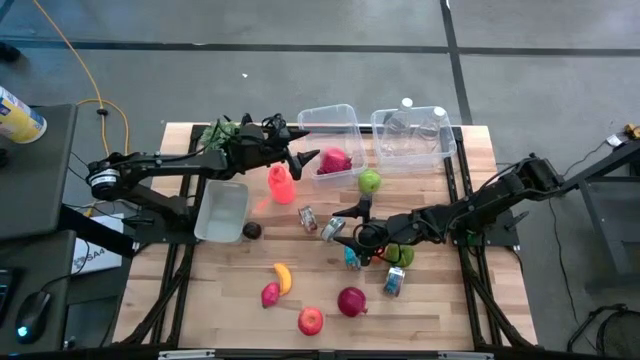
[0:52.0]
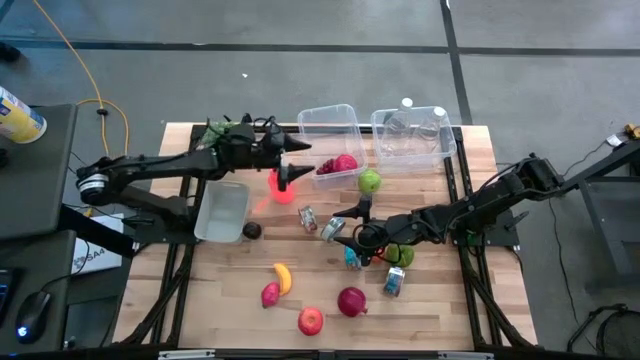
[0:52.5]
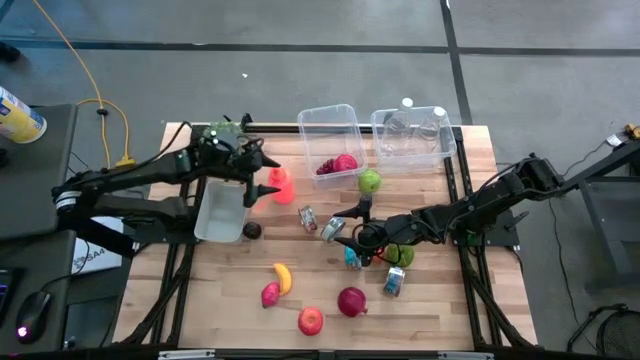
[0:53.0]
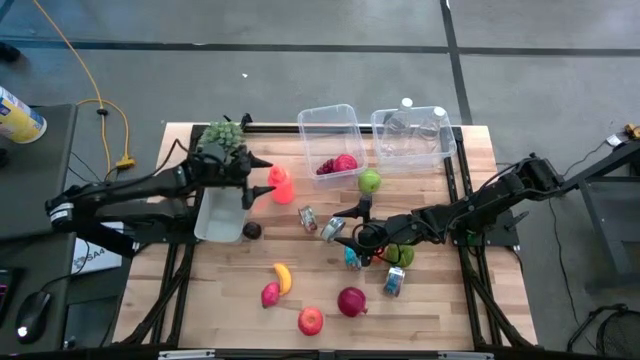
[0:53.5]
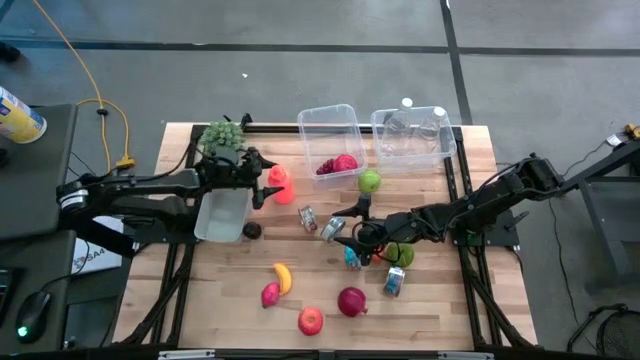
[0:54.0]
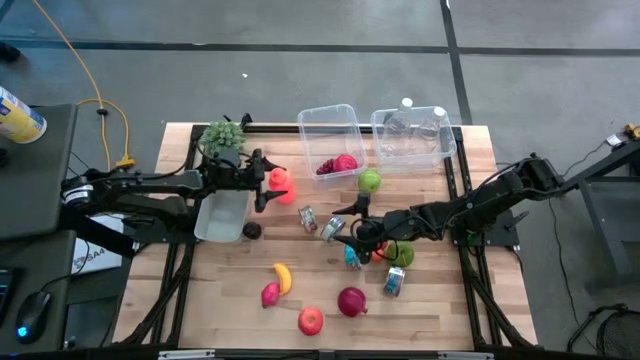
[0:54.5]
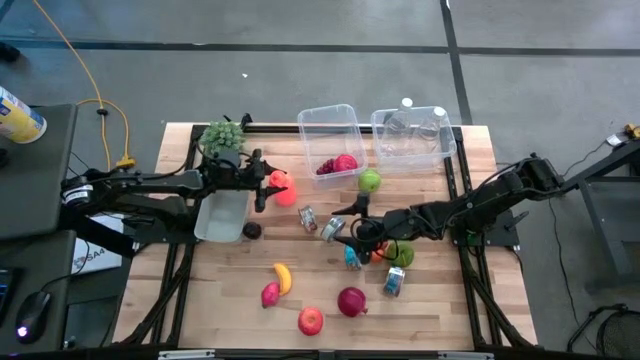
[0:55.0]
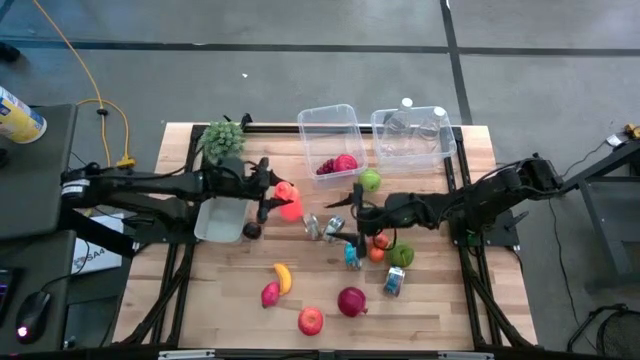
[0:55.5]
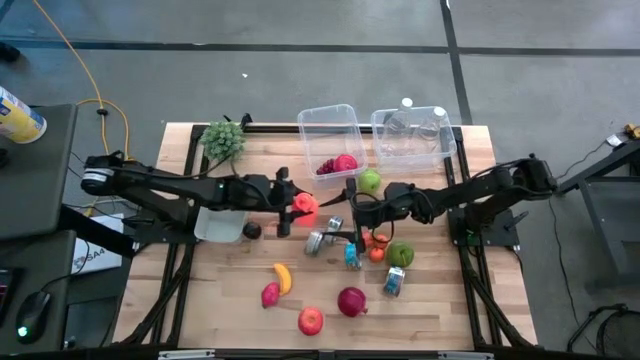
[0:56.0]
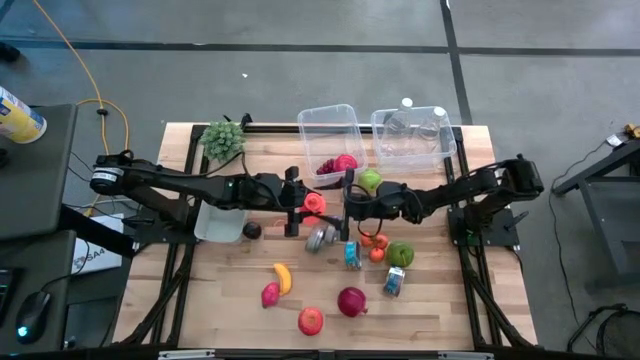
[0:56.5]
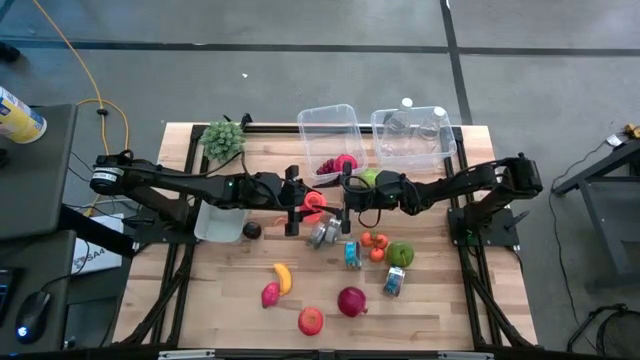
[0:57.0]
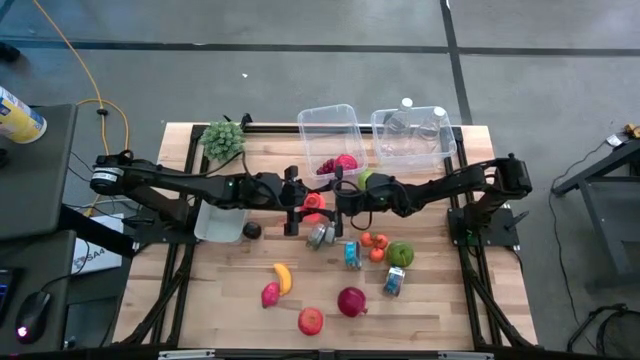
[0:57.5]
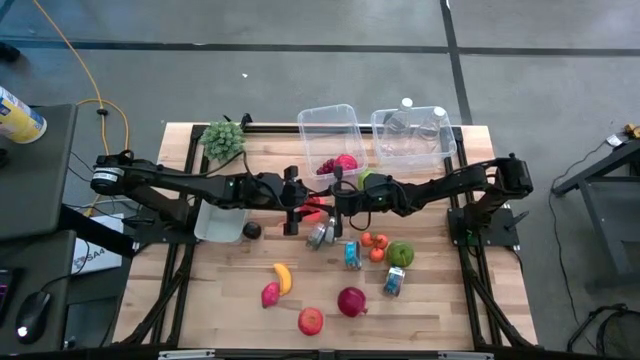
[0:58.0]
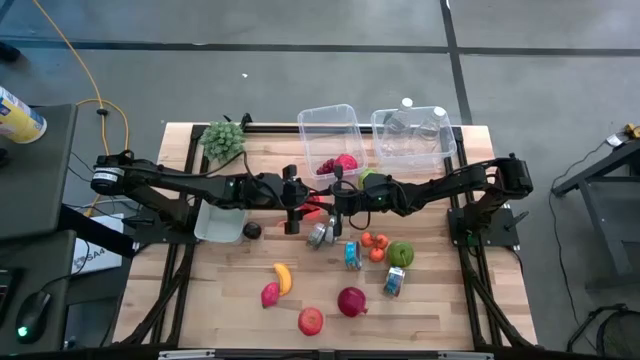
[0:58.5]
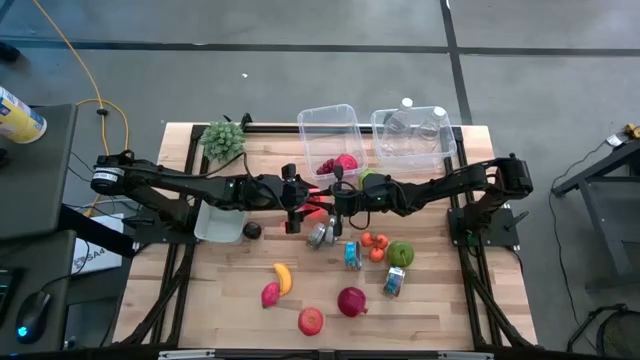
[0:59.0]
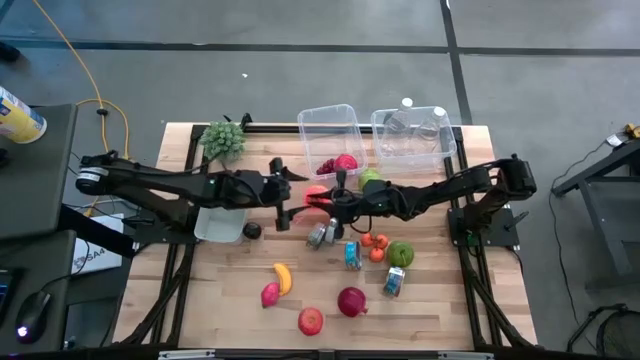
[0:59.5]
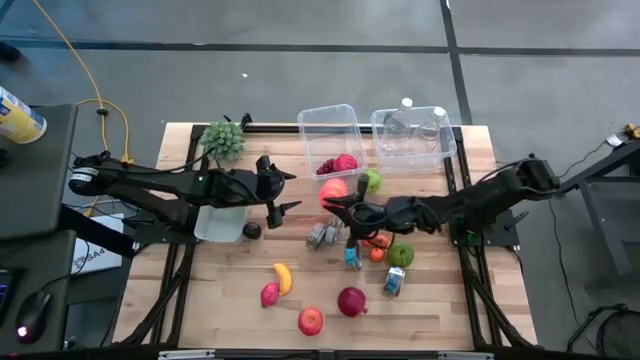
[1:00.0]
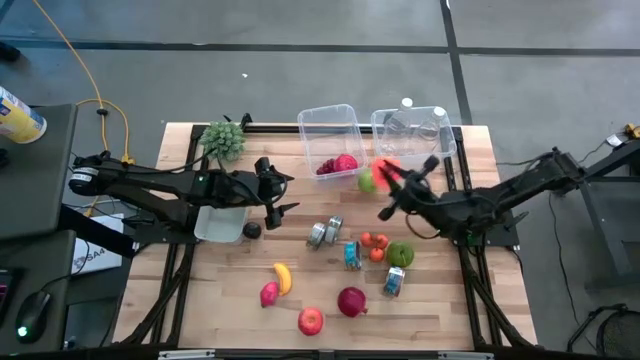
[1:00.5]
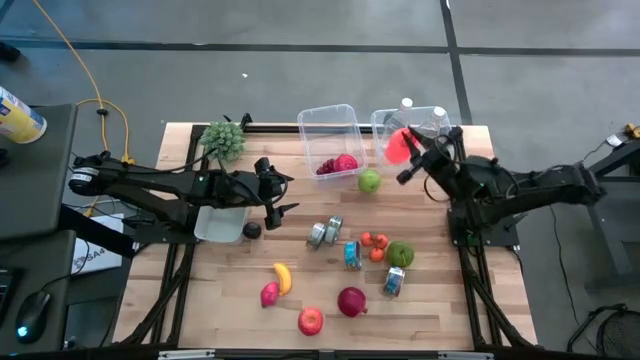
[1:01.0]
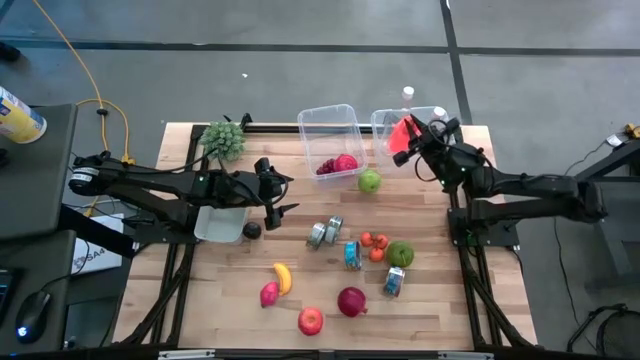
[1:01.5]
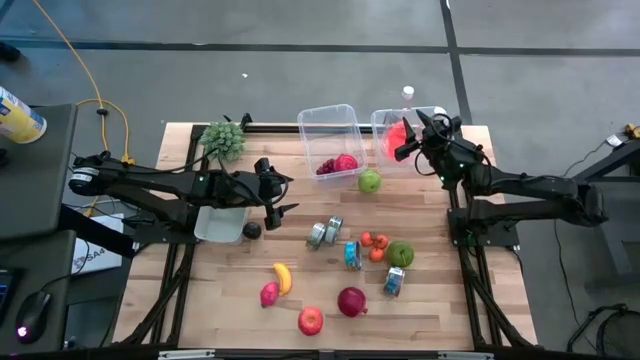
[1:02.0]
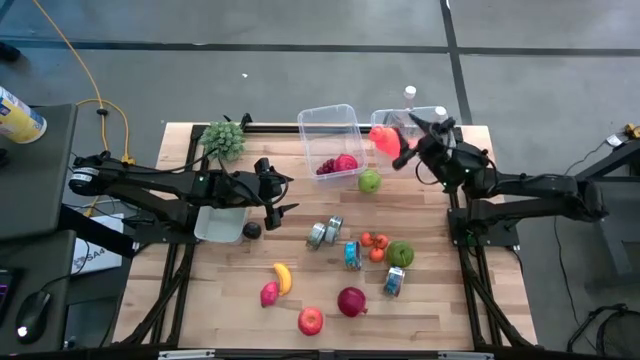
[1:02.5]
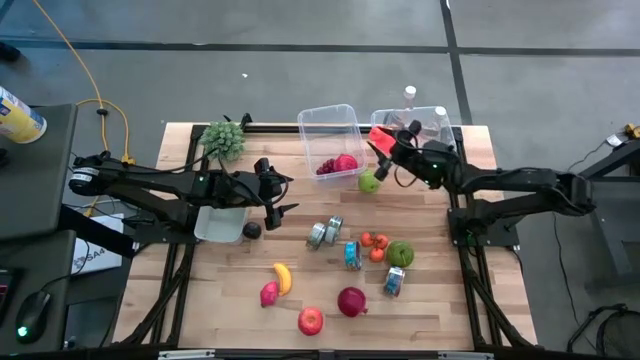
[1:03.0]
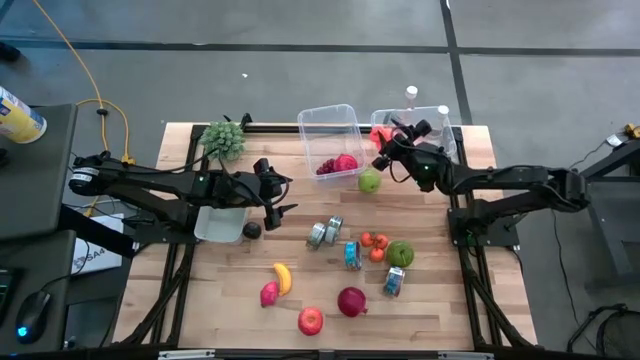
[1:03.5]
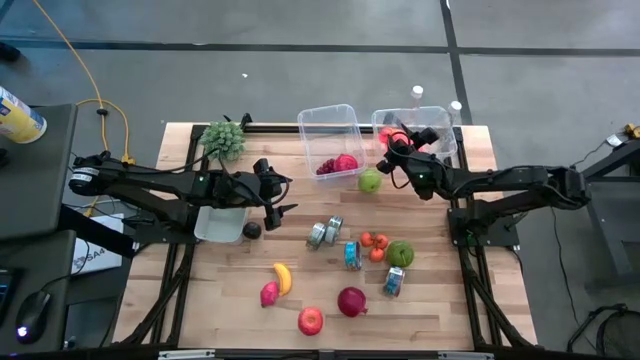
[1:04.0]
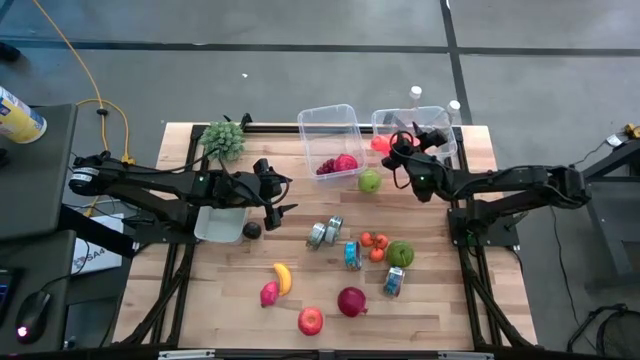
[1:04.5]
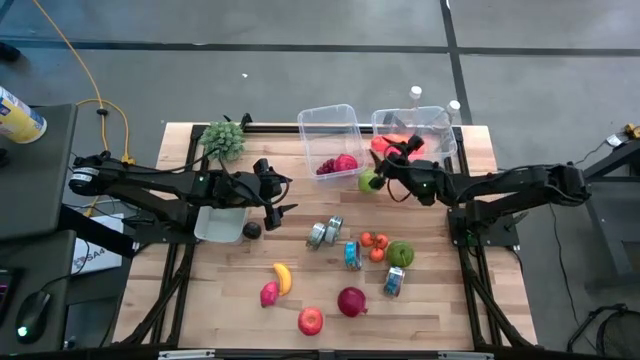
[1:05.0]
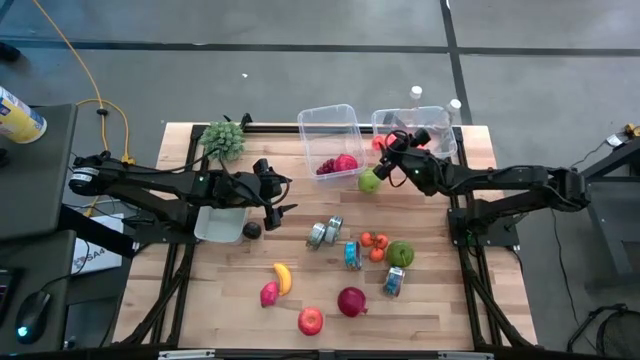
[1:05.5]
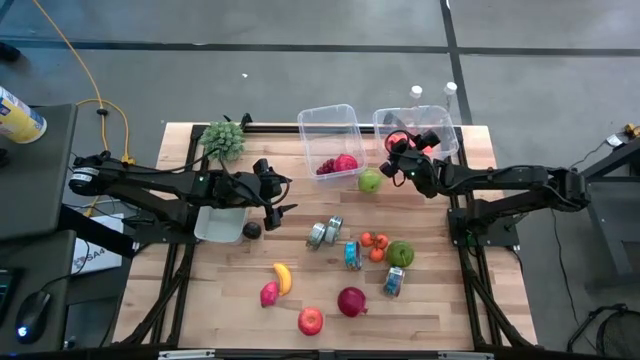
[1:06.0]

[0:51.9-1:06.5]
Task: Pick & Place Food Item
Put the orange tumbler into the right transparent bin

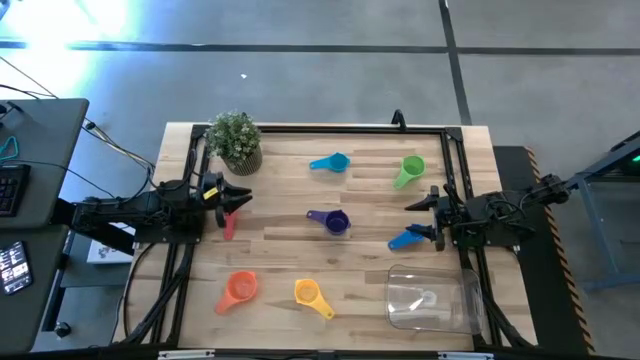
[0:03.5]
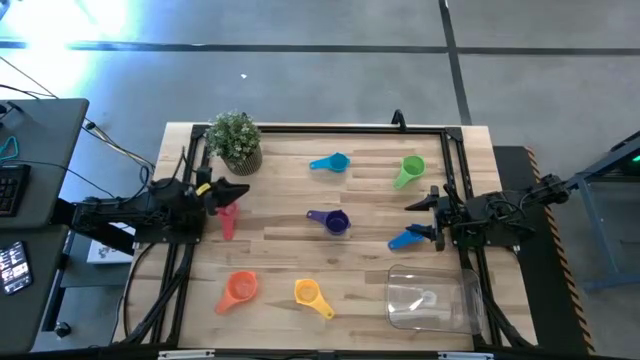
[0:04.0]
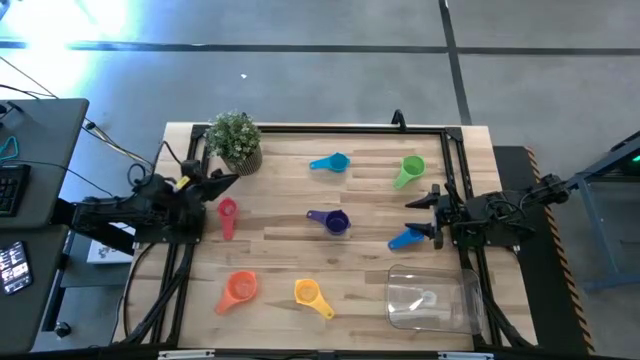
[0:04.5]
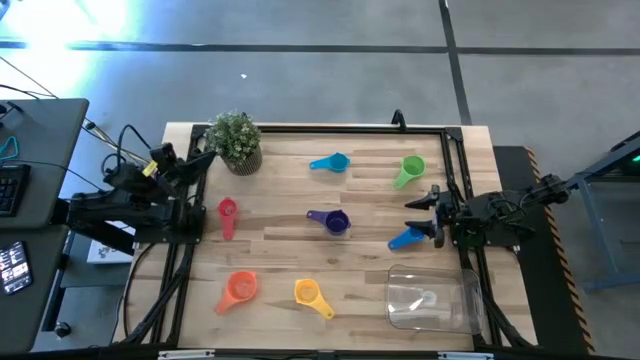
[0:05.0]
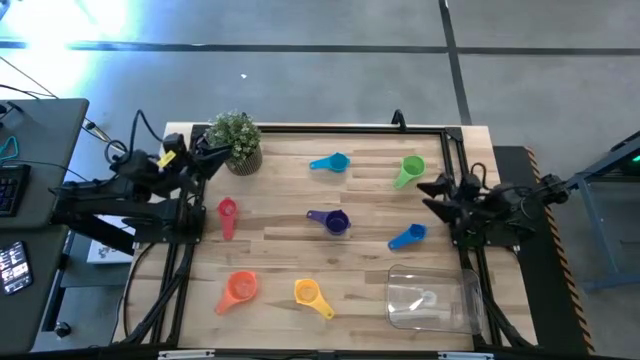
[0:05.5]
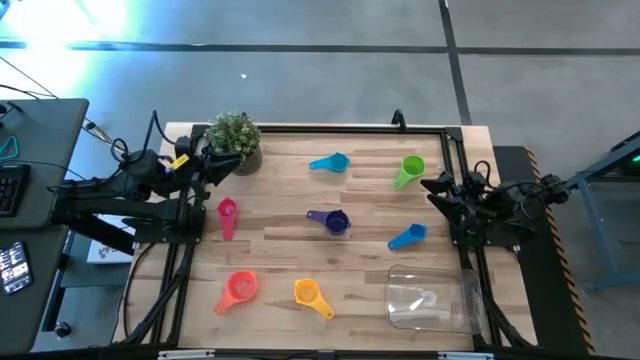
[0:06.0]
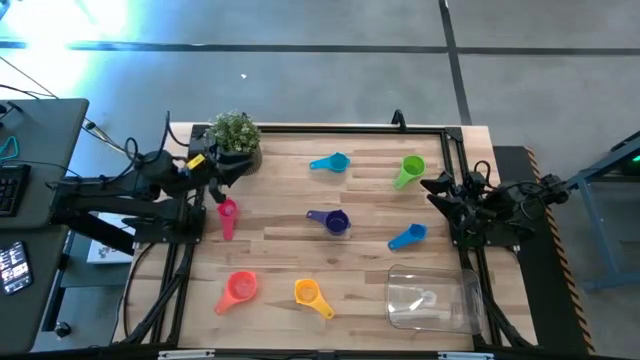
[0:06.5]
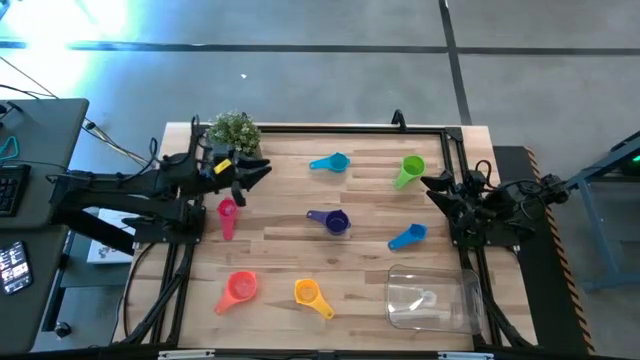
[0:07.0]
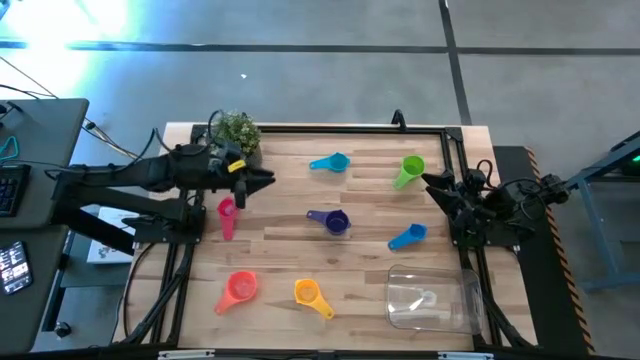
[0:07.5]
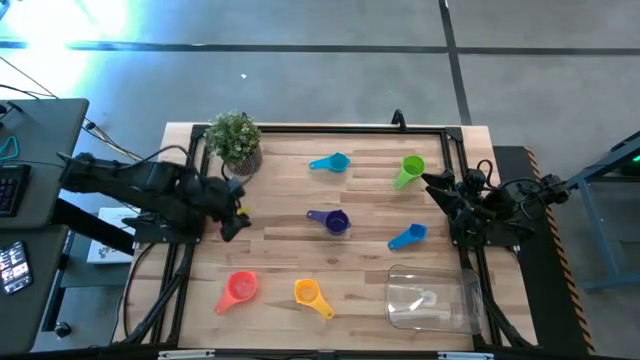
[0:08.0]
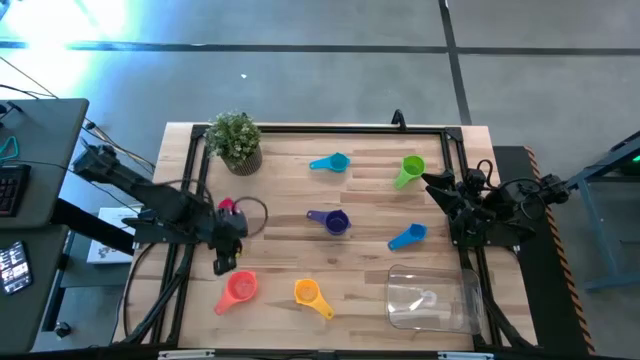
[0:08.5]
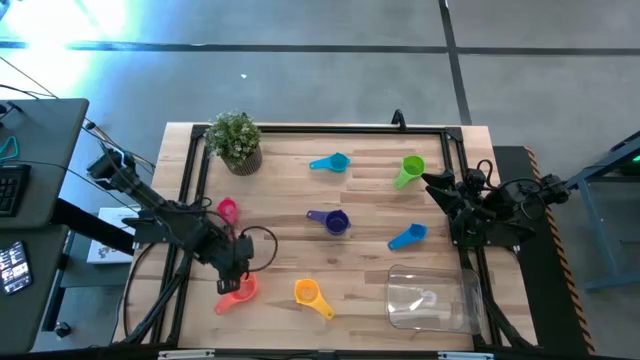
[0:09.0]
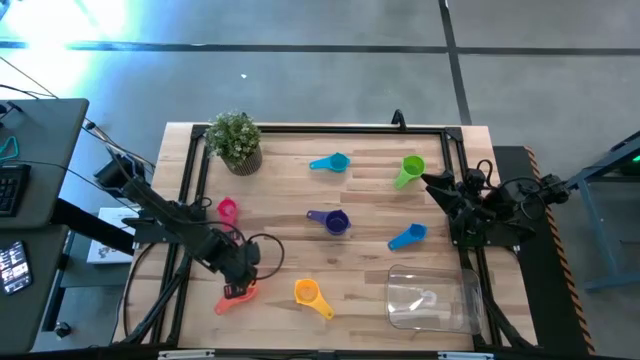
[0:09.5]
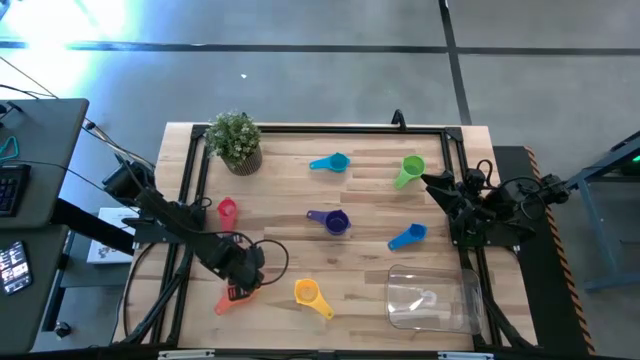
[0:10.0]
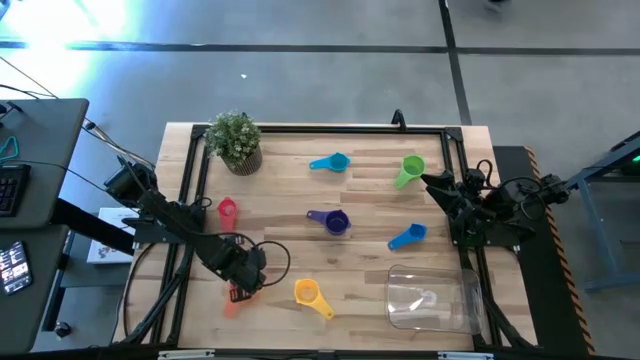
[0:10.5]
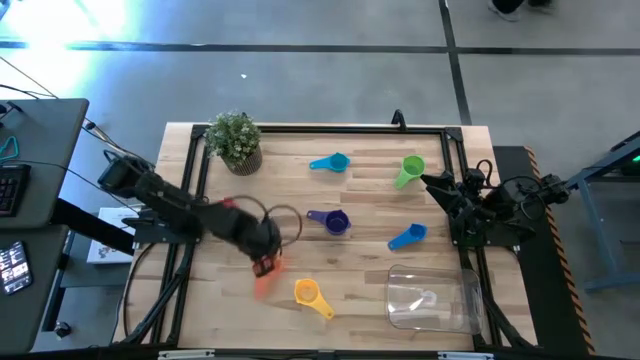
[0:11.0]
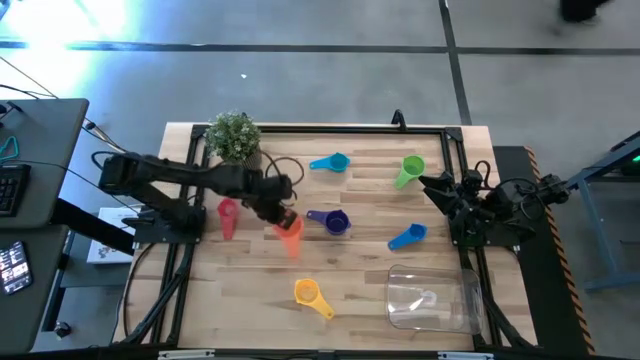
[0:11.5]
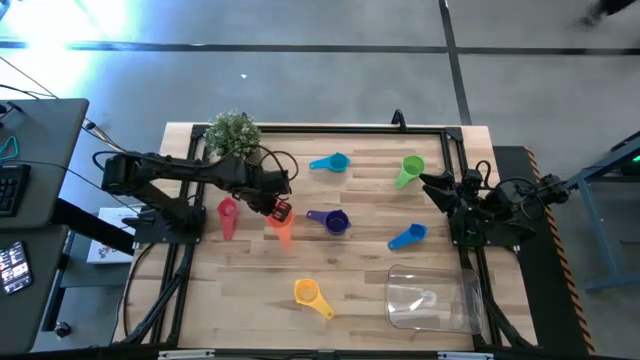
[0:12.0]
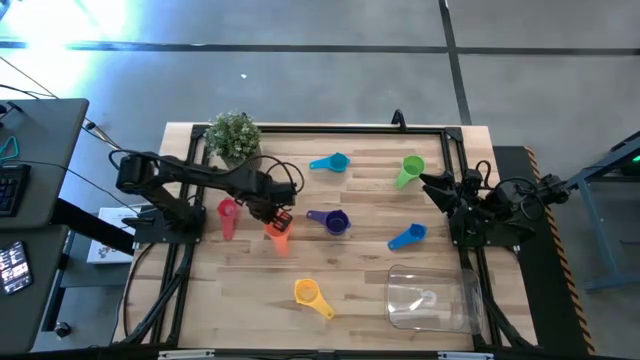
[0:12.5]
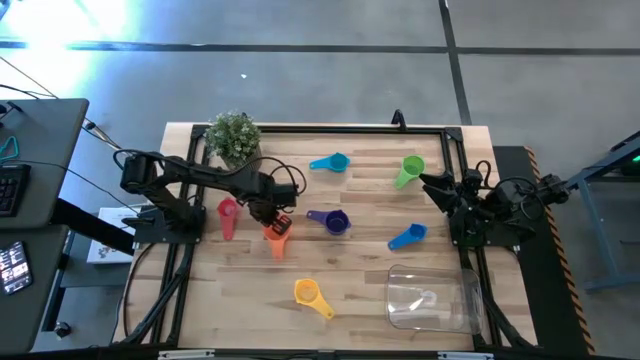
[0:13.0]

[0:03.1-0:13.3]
Task: Nest measuring cups in basket
Move the orange measuring cup to the middle left of the table
